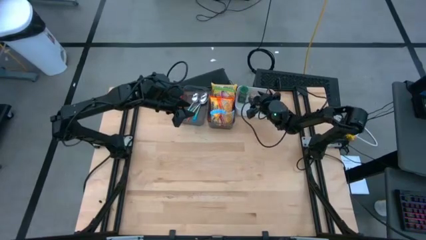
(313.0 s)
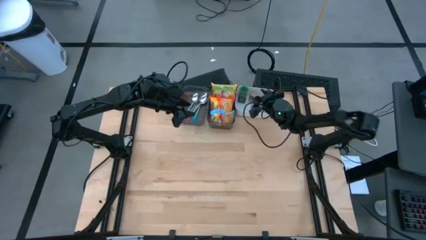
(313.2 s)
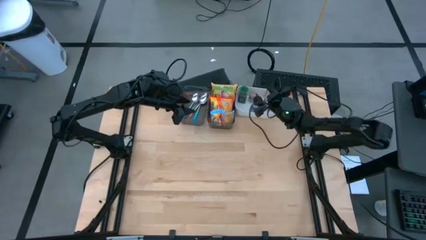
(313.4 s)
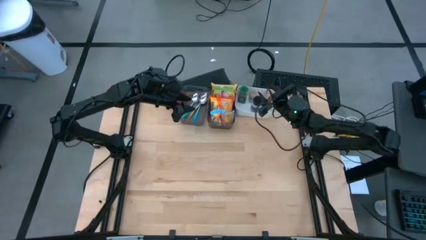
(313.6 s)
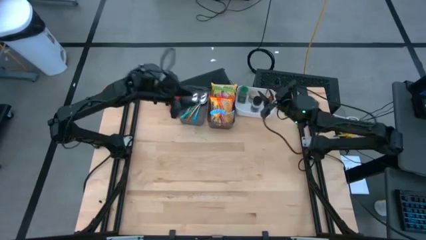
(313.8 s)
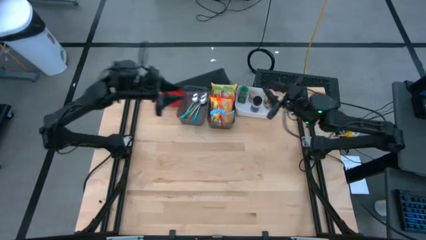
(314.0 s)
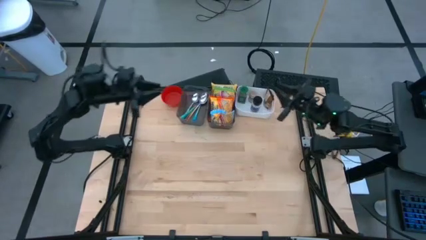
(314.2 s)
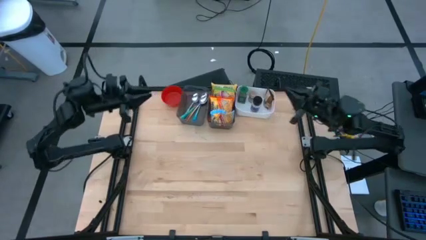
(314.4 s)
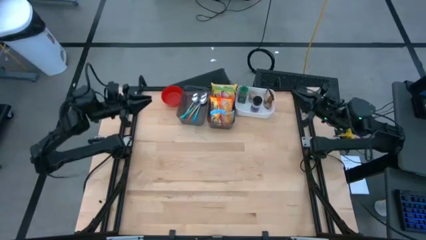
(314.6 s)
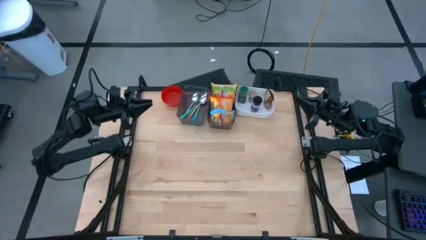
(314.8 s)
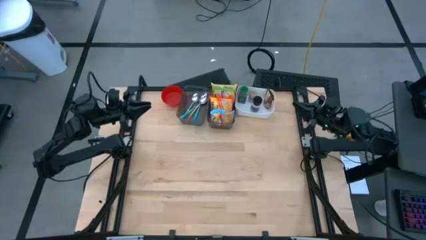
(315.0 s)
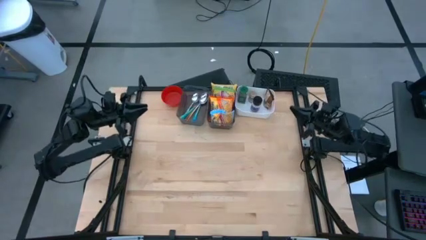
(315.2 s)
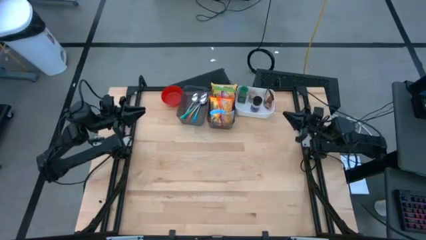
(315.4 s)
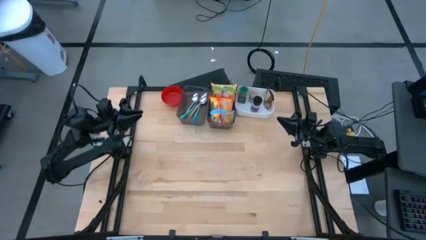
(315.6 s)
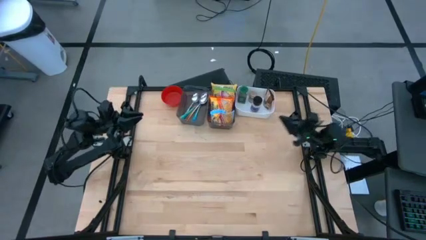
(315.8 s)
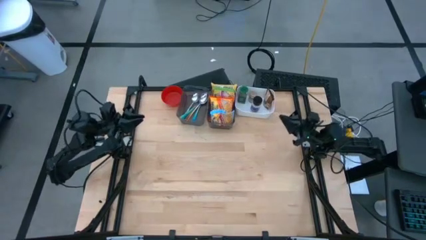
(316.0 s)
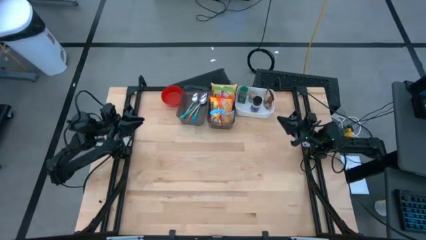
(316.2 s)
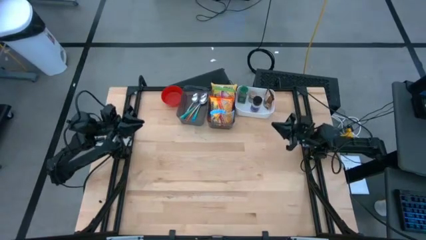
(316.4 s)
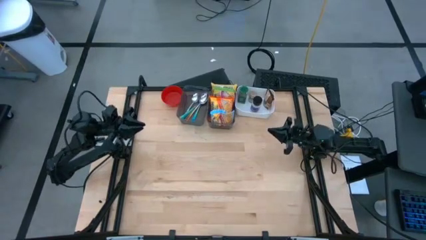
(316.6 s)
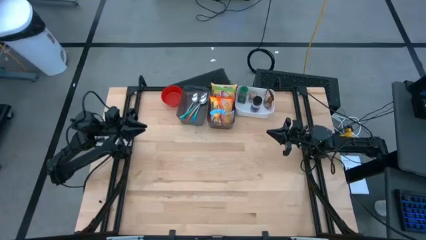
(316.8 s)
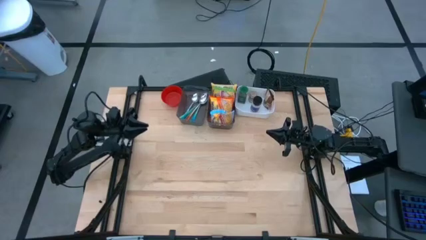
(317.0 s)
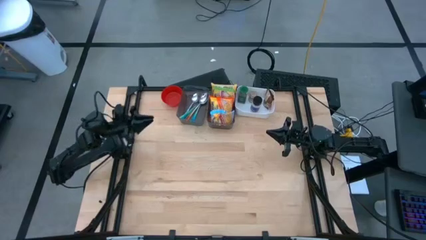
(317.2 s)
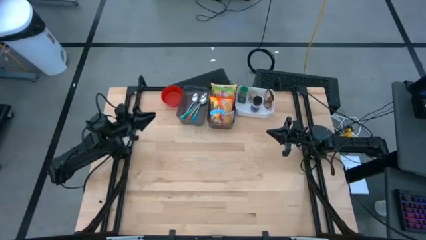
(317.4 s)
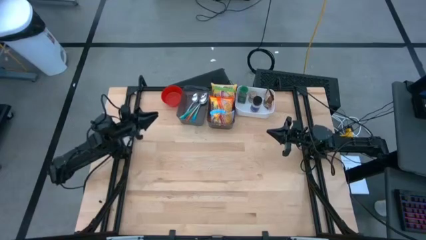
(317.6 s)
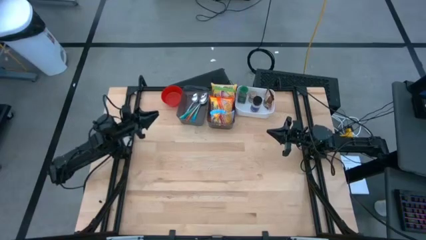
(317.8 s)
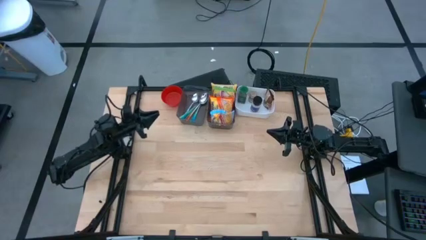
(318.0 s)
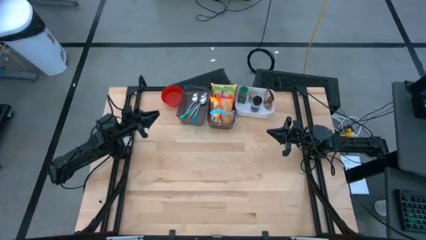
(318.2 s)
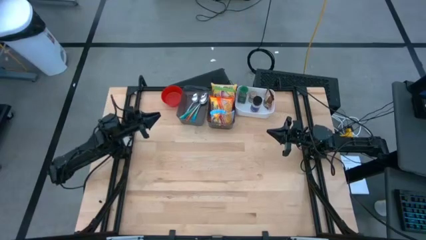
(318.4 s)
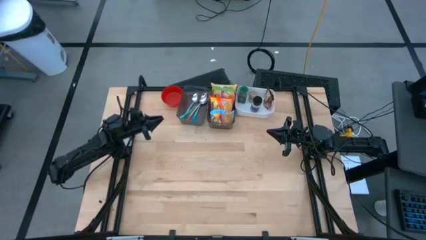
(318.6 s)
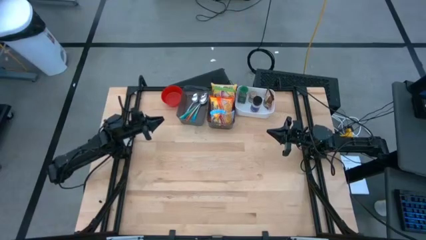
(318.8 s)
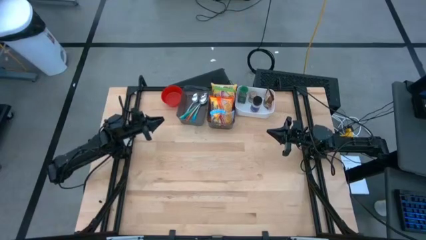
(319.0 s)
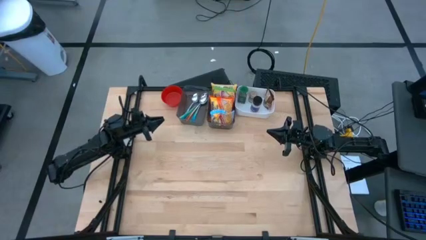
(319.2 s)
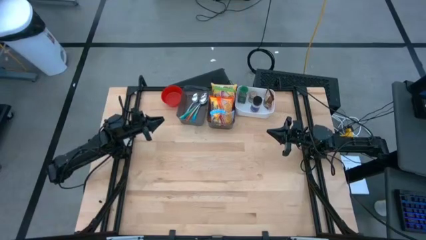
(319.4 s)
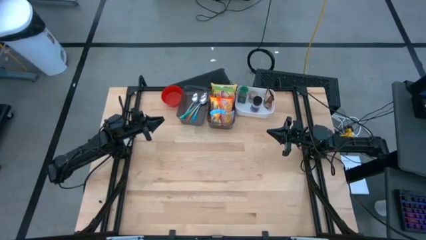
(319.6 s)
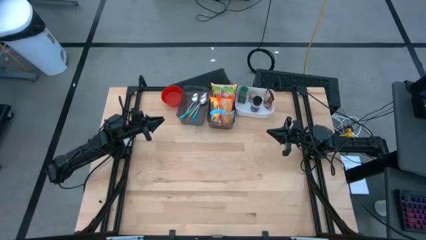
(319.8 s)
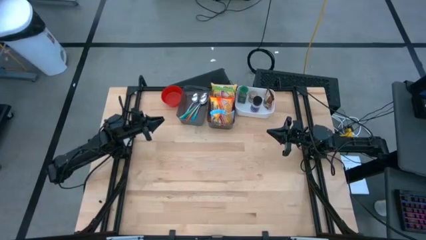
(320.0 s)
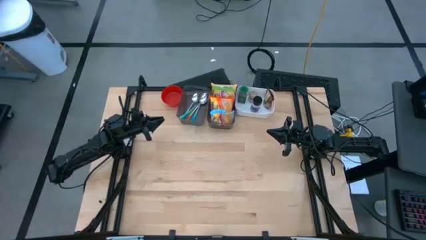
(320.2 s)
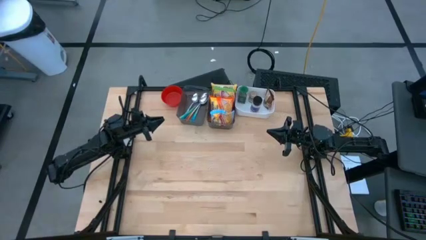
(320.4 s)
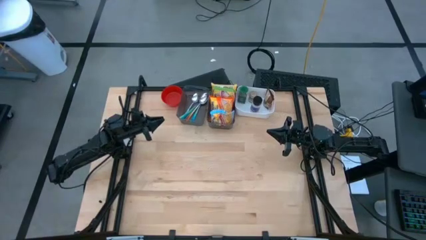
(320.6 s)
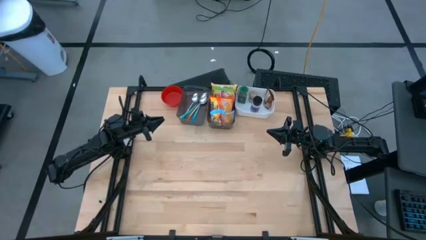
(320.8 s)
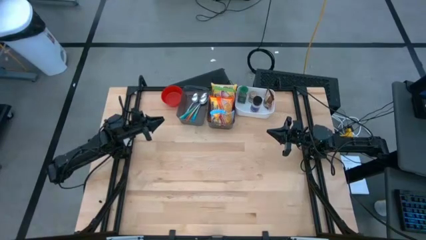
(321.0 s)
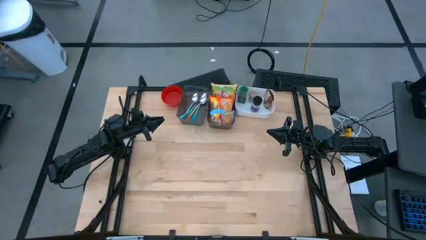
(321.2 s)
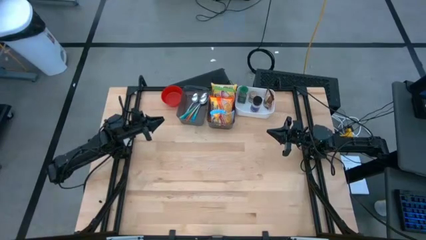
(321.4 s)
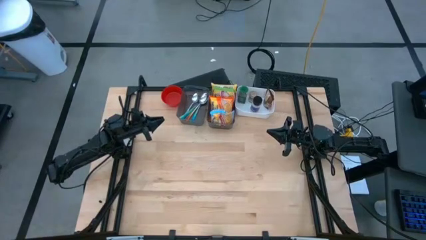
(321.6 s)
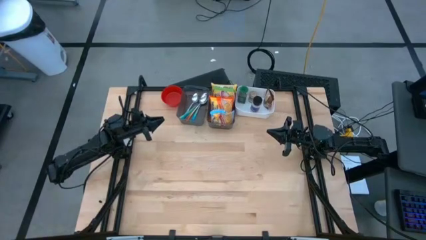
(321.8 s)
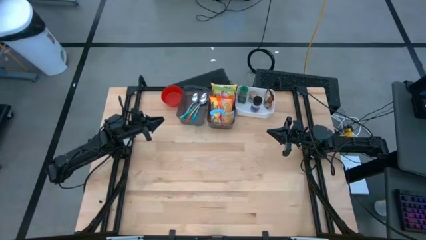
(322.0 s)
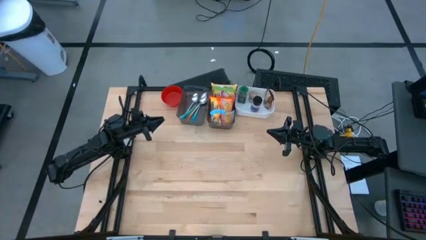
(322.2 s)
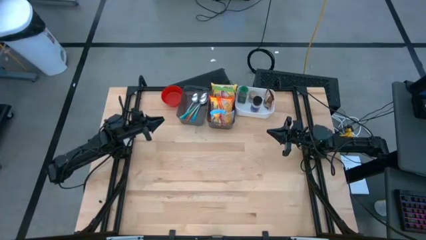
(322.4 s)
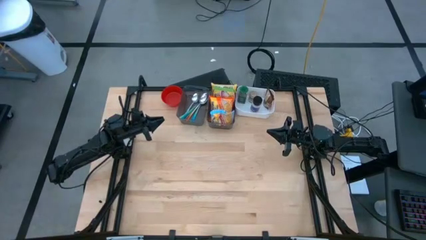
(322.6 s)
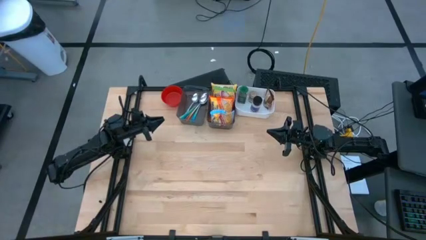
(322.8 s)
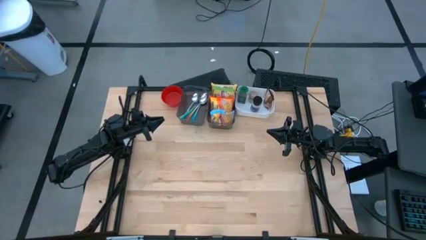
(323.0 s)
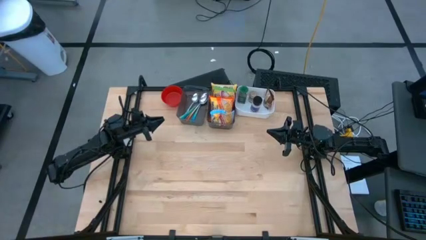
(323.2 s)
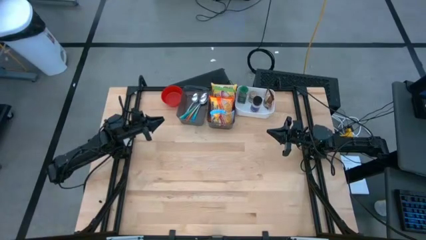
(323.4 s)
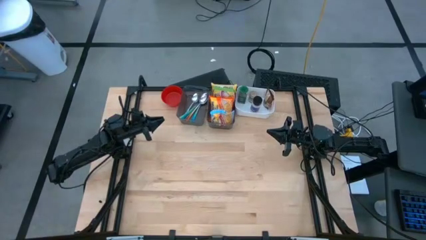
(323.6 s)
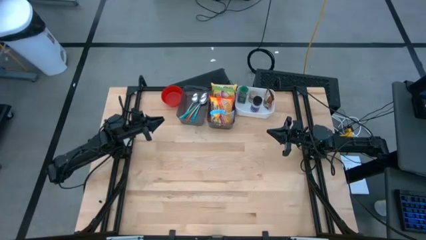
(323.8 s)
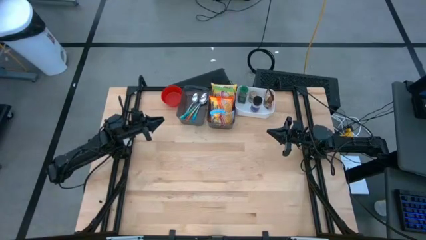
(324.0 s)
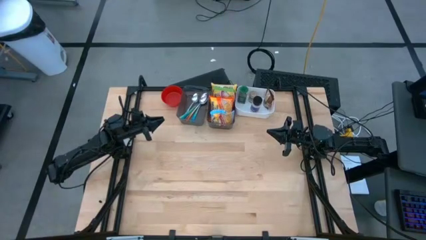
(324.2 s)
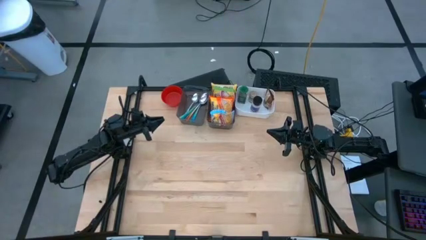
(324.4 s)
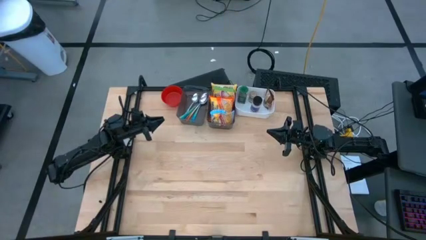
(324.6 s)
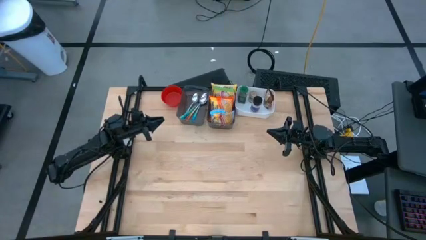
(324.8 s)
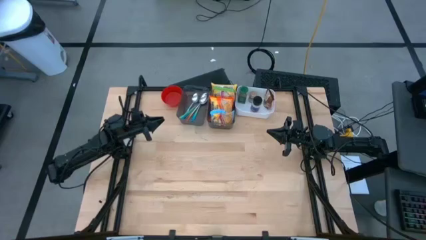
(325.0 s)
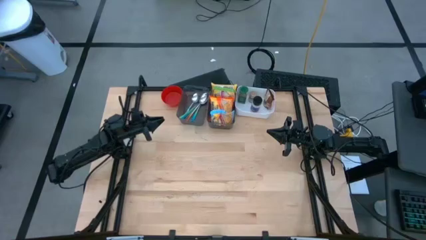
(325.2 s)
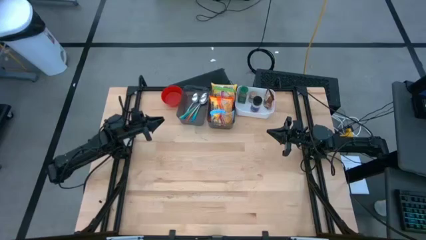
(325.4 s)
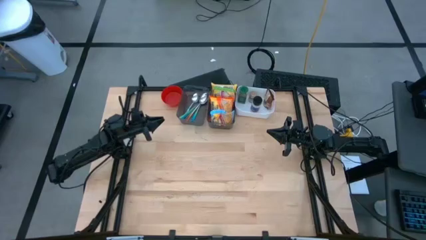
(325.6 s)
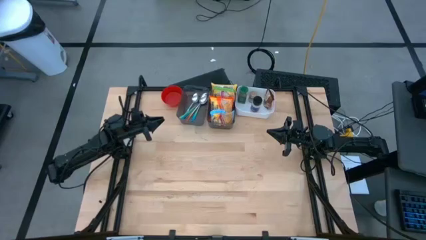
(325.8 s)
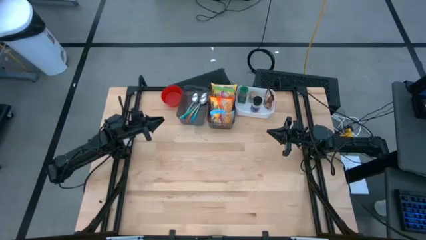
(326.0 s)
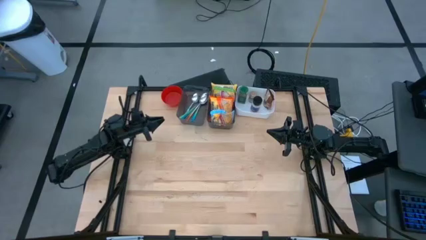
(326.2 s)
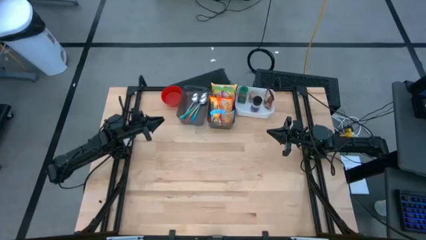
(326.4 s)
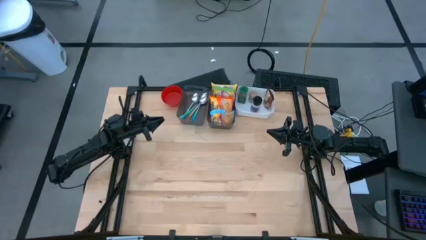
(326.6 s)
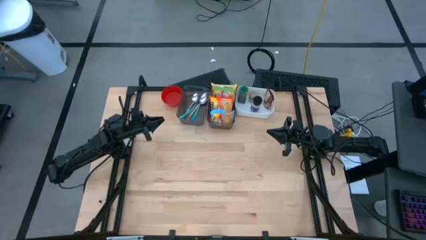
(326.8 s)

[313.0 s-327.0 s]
Task: Pick & Place Food Item
Return to Home Position

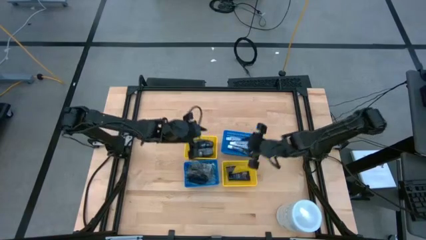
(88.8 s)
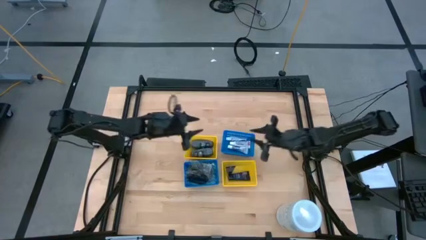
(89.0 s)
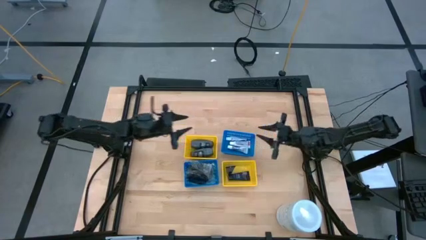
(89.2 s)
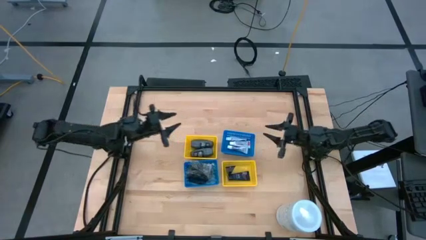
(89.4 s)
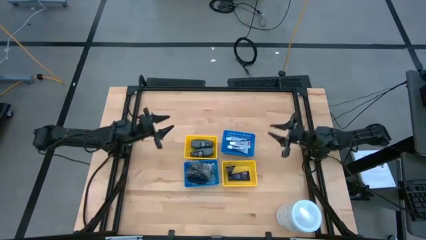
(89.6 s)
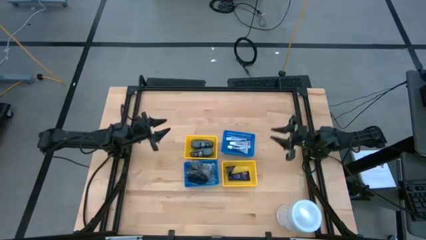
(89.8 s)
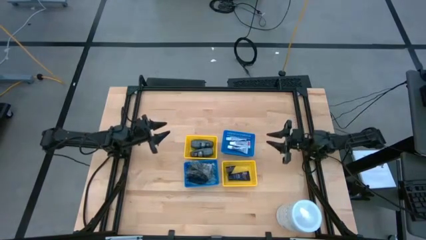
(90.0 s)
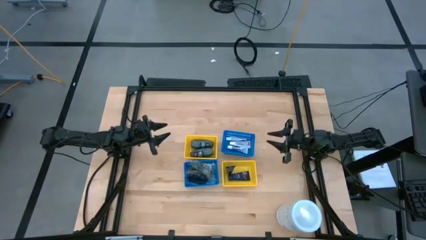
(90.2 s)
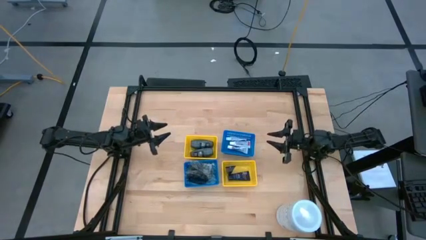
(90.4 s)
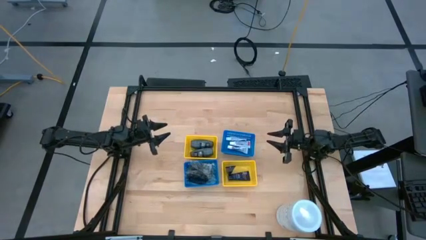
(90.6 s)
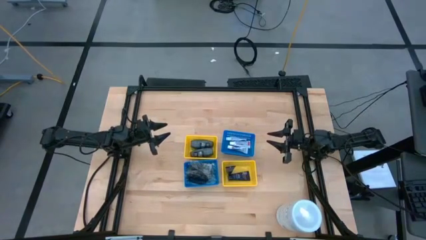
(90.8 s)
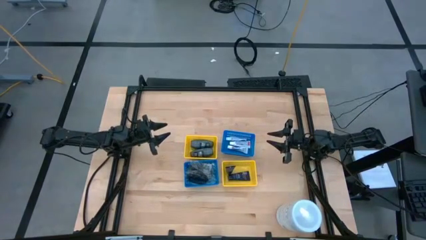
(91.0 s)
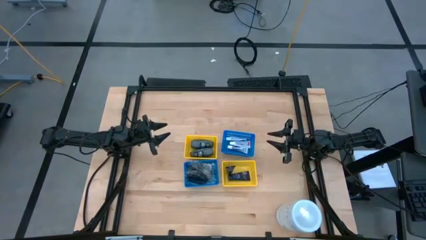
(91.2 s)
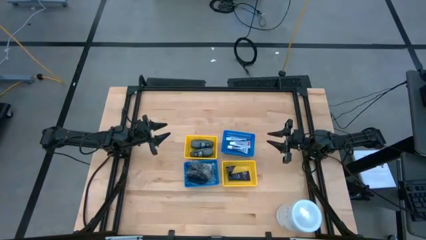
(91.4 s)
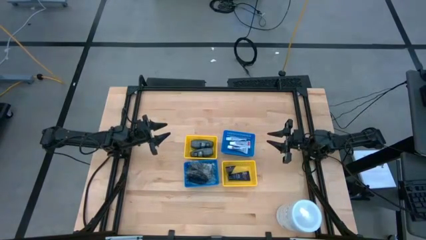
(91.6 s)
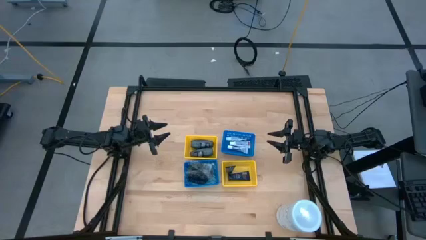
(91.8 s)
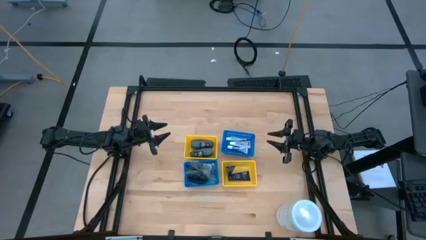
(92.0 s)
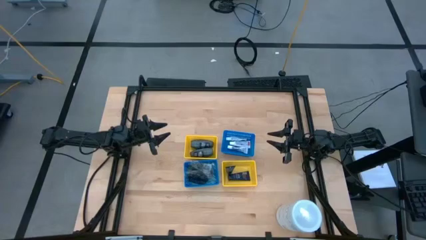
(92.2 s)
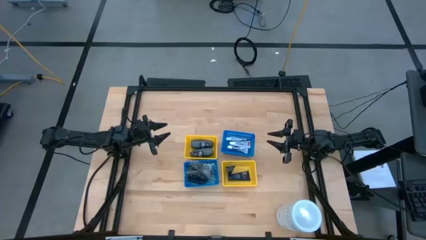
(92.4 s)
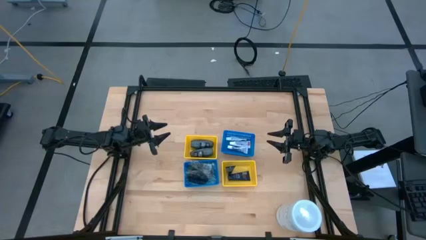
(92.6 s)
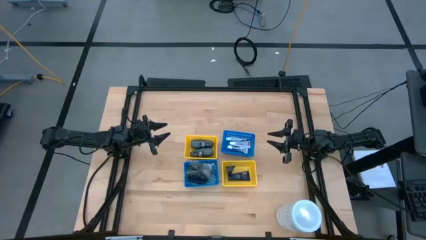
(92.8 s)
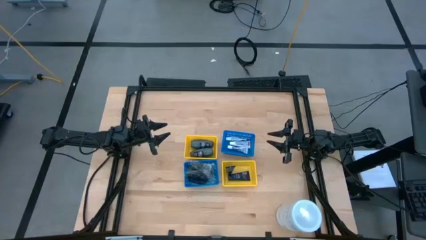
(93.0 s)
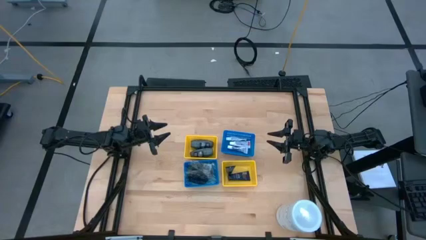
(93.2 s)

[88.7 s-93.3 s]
Task: Pick & Place Travel size toiletries
Return to home position
